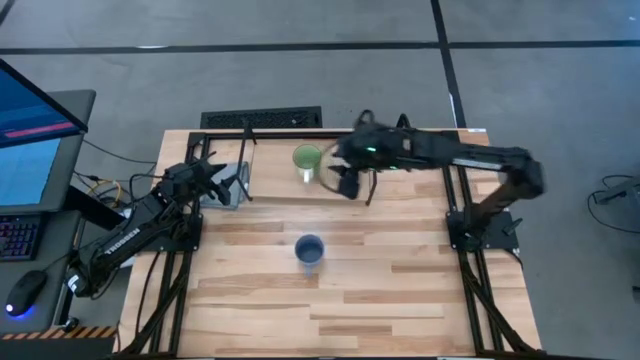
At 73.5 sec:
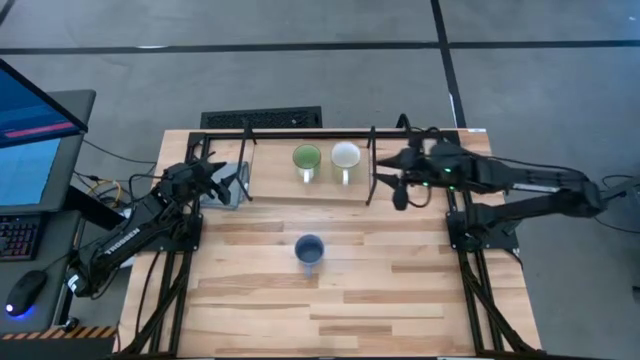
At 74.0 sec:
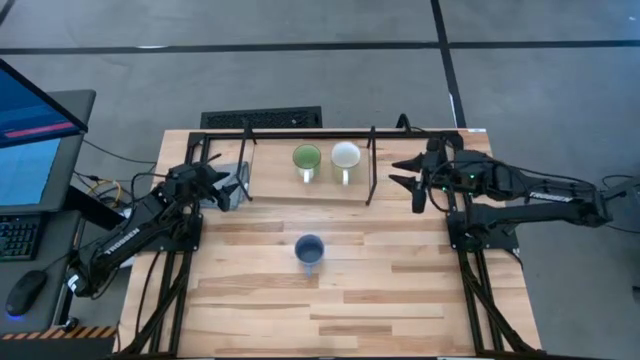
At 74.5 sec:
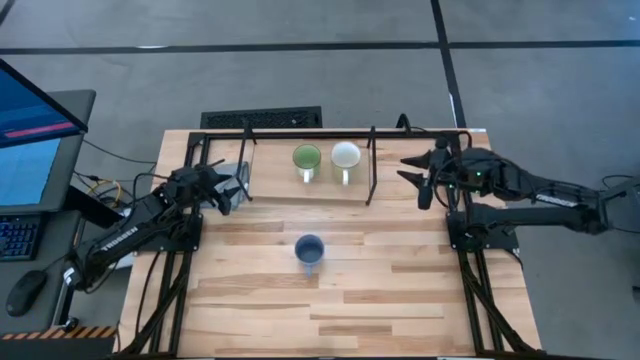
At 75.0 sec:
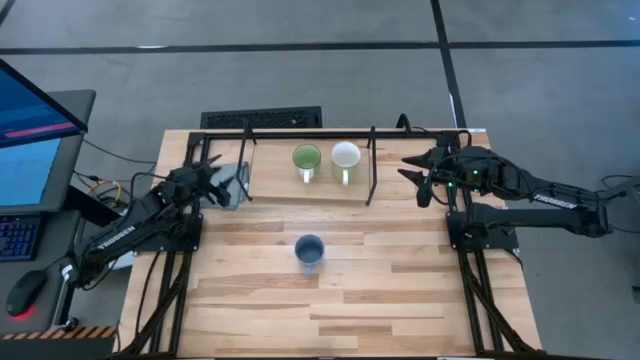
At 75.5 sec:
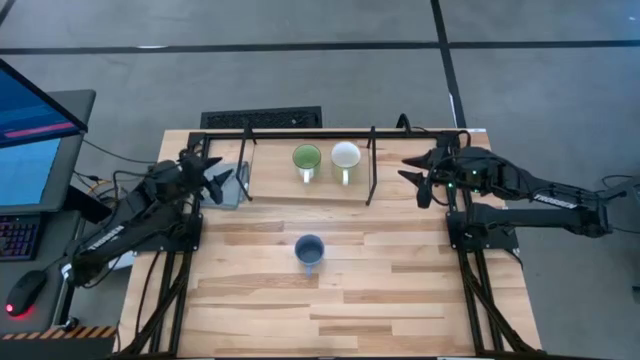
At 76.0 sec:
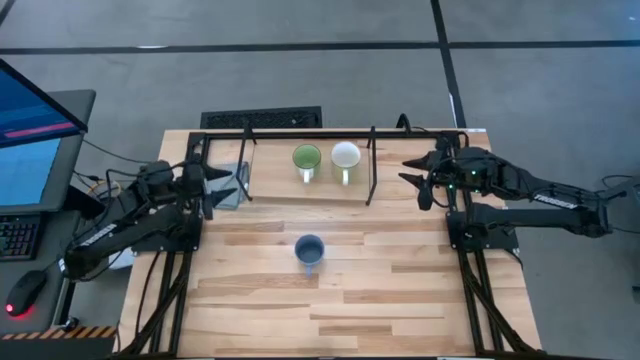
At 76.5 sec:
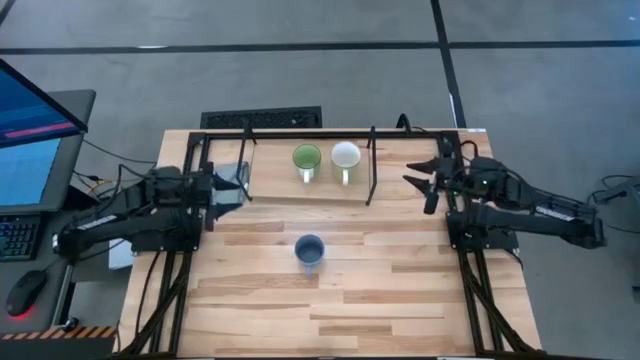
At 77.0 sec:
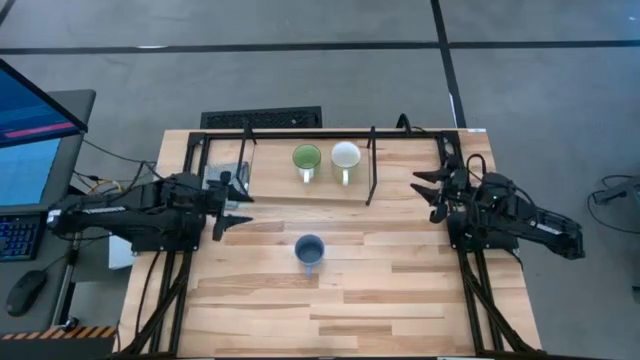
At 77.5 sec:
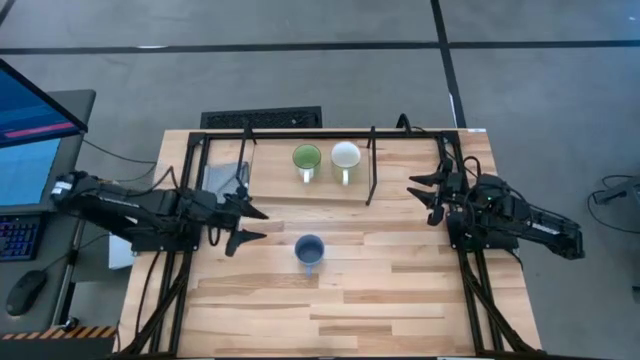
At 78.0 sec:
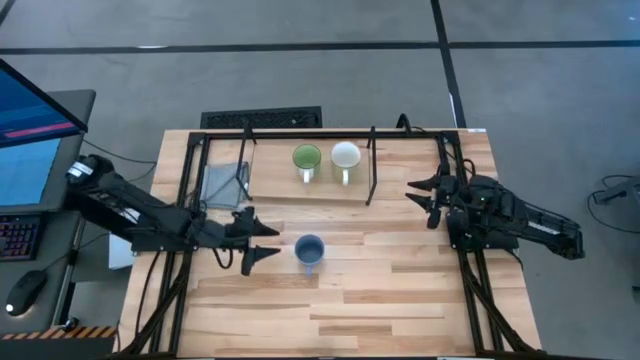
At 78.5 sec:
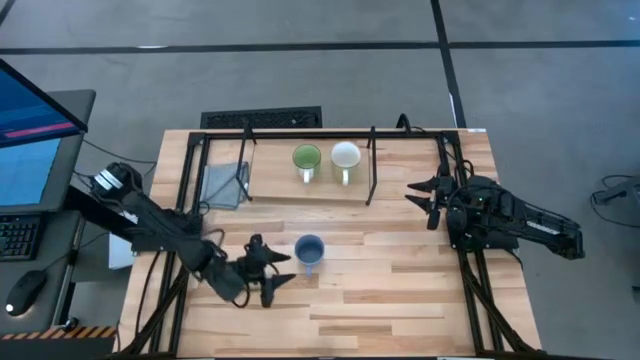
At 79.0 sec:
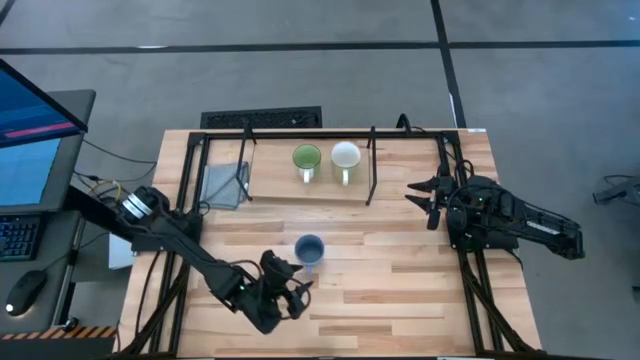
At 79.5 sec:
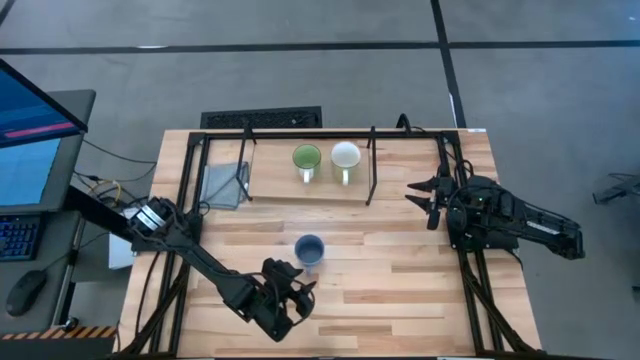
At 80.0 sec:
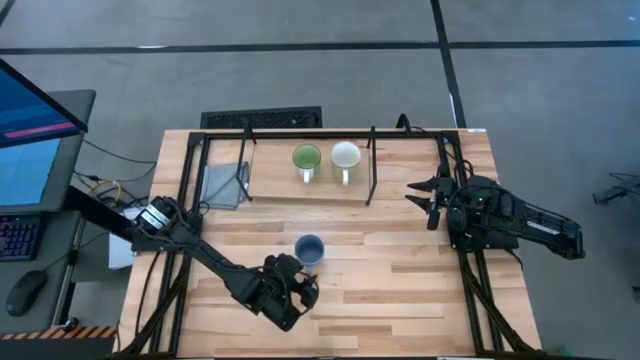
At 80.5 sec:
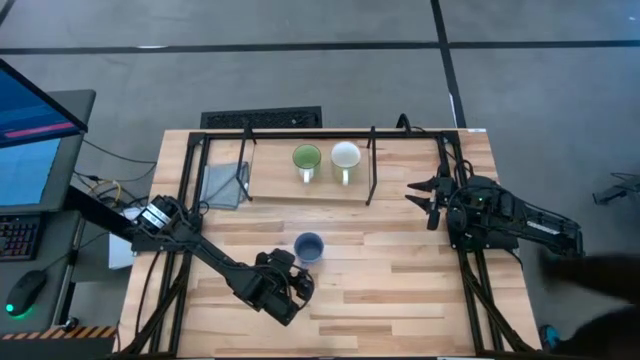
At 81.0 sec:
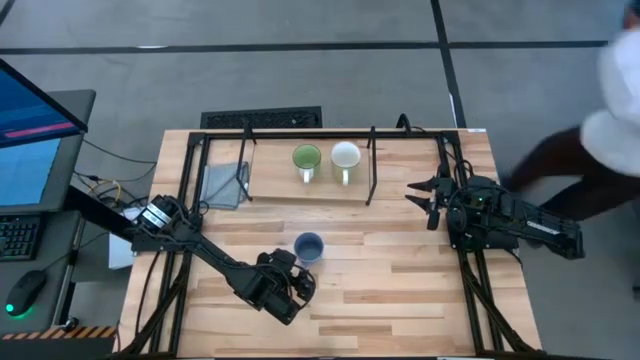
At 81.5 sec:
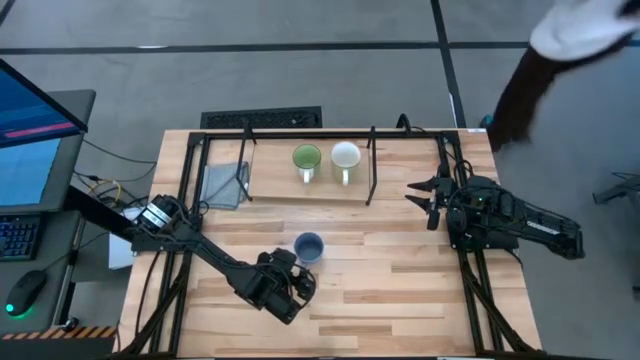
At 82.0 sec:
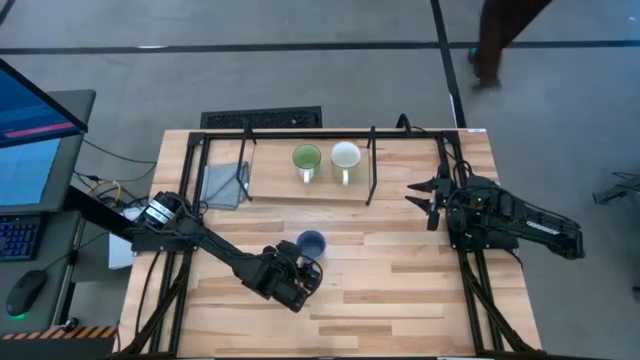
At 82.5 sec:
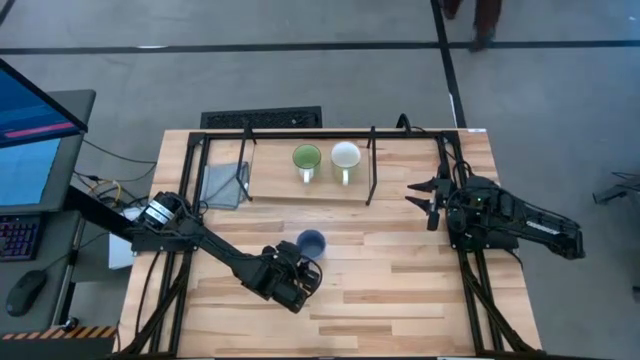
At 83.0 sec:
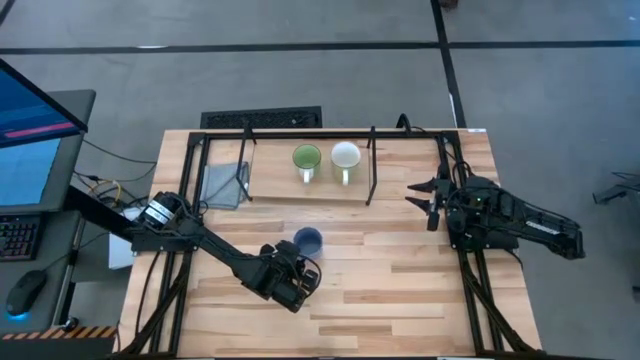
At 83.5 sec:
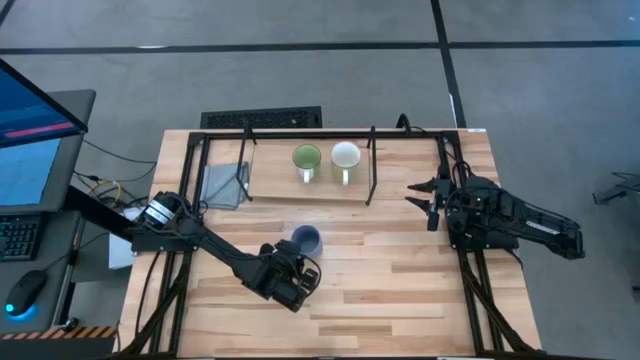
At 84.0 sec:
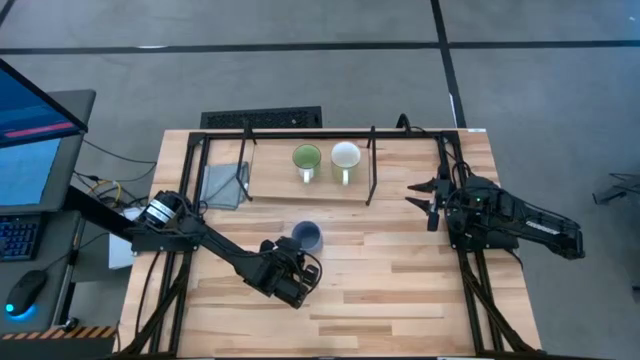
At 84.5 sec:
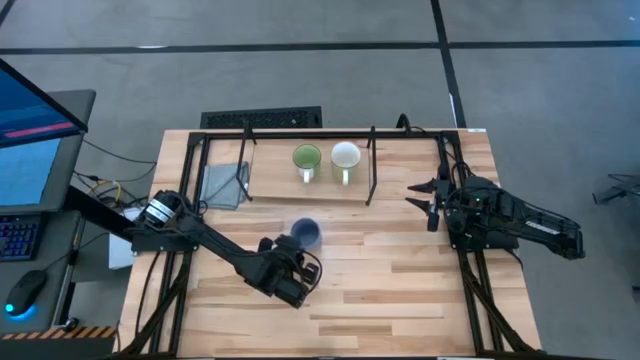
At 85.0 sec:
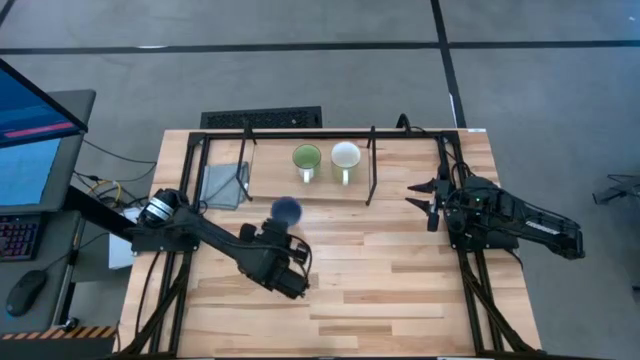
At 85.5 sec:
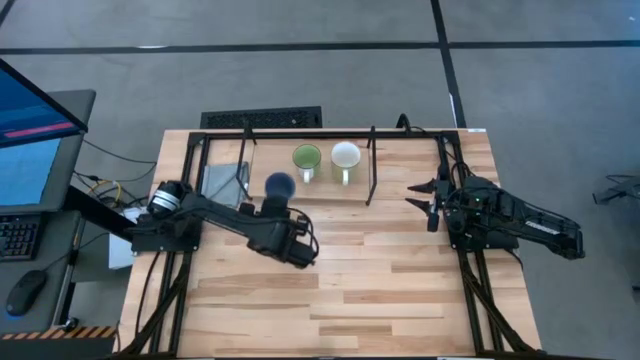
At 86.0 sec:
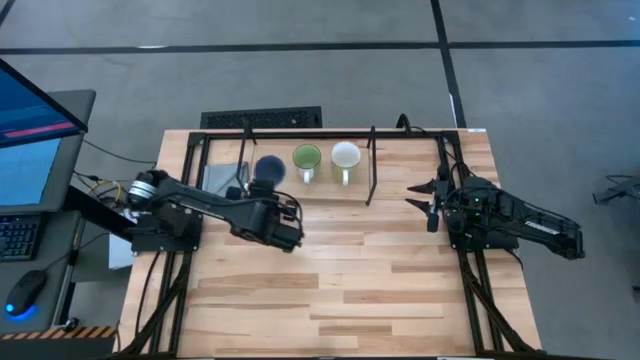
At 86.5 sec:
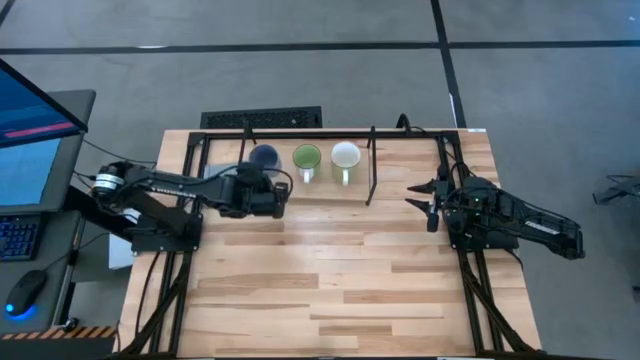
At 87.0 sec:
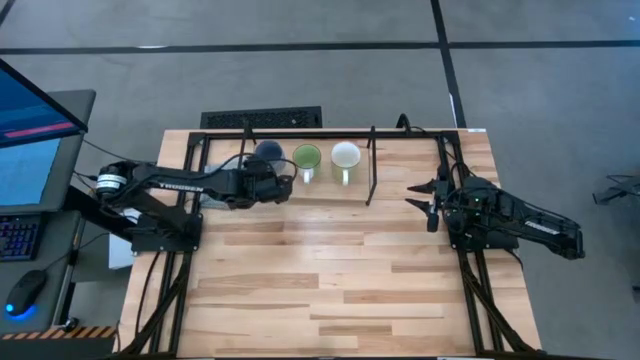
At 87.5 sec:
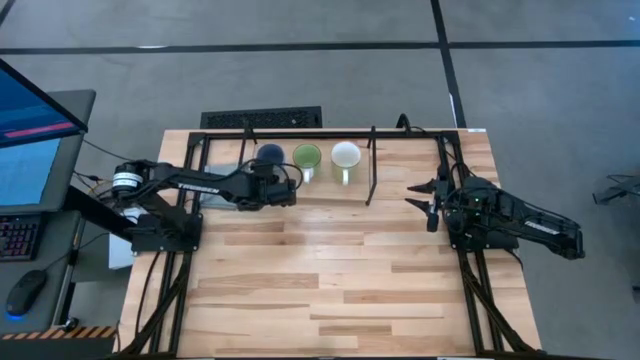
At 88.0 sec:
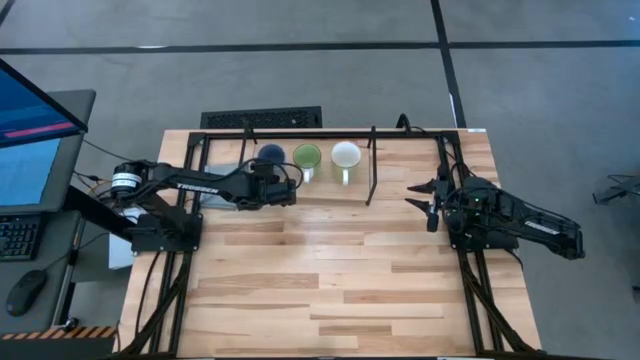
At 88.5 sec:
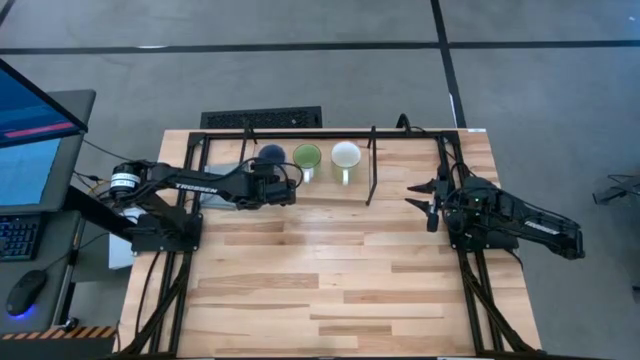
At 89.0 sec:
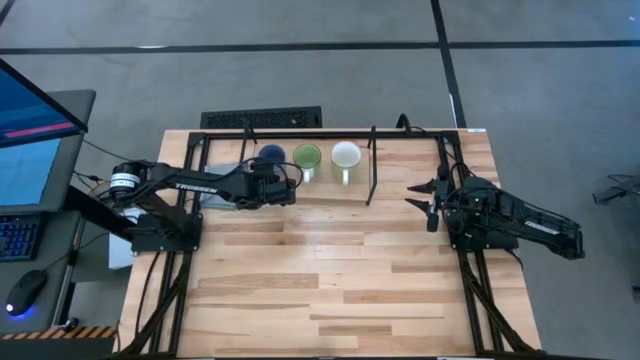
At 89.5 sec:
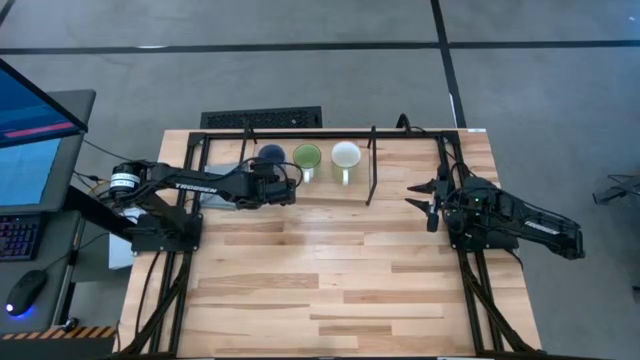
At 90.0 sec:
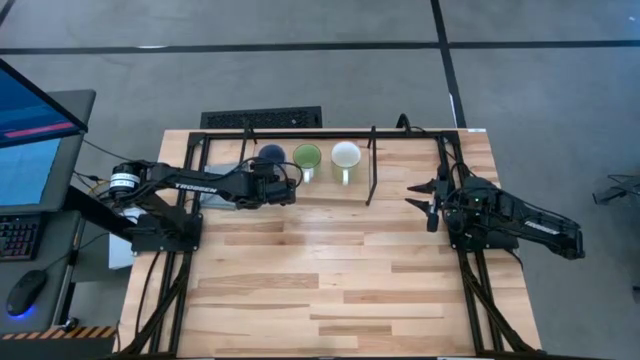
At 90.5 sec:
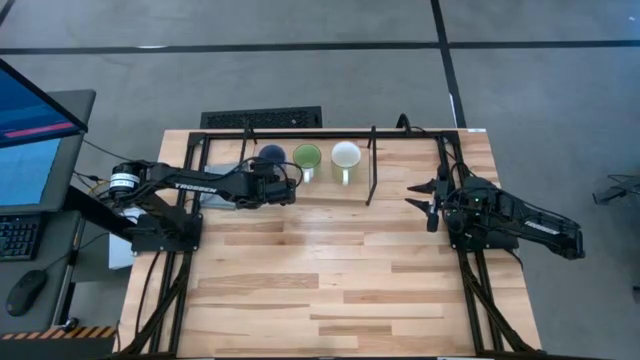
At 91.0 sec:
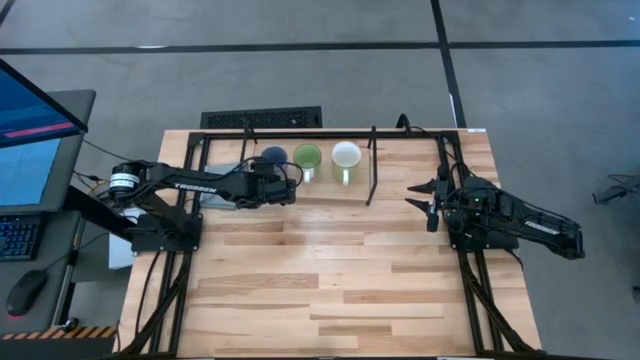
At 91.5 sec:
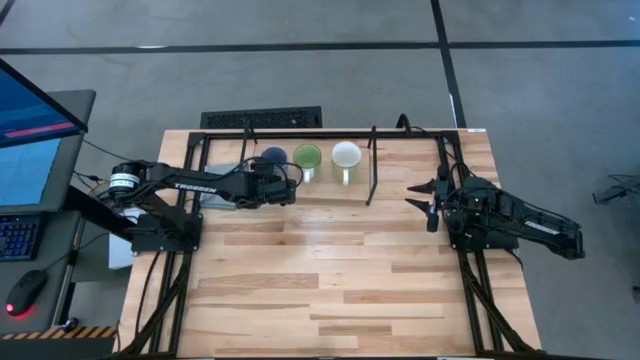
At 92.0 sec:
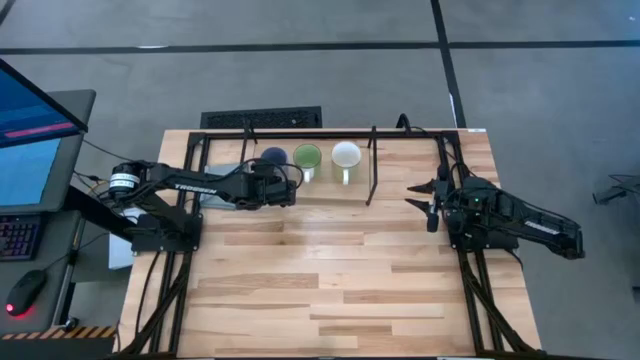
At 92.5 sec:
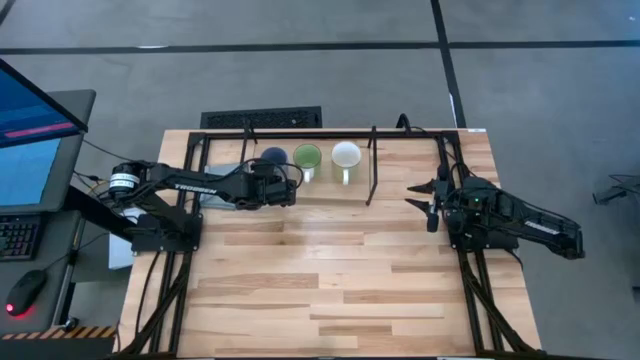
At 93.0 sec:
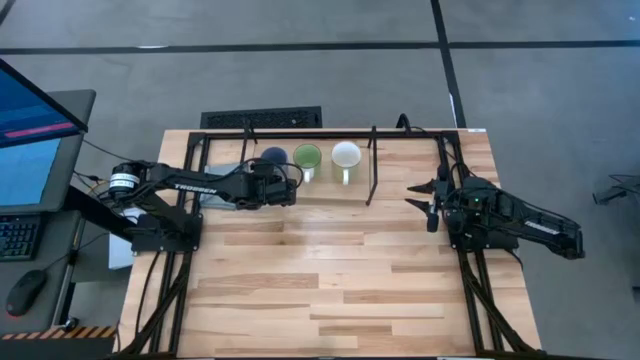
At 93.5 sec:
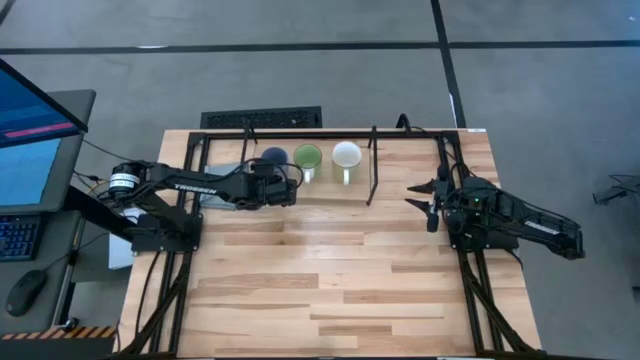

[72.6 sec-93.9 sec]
Task: Stack small to large cups/mugs on shelf
Put the blue mug on the shelf
